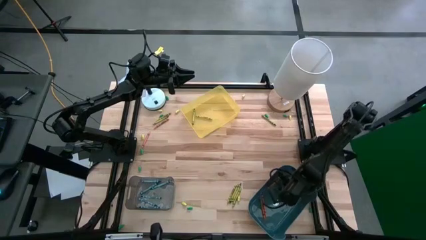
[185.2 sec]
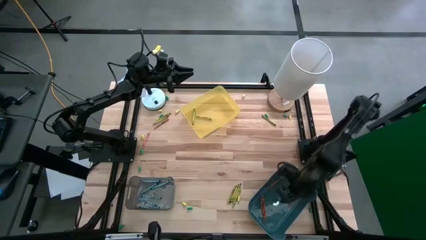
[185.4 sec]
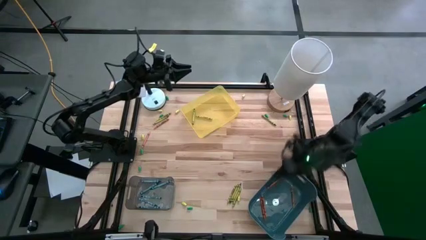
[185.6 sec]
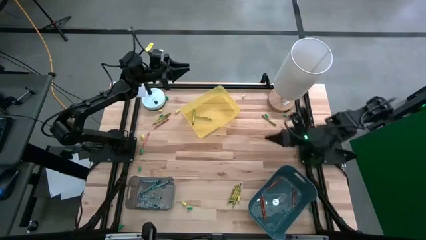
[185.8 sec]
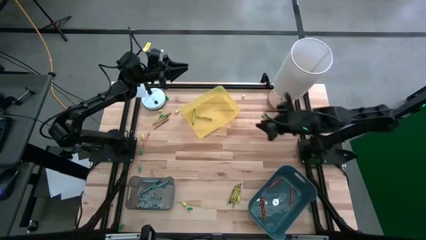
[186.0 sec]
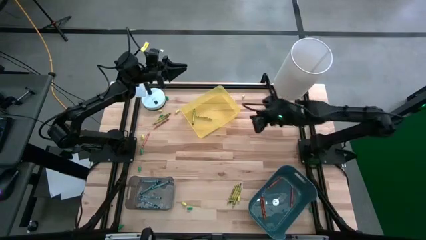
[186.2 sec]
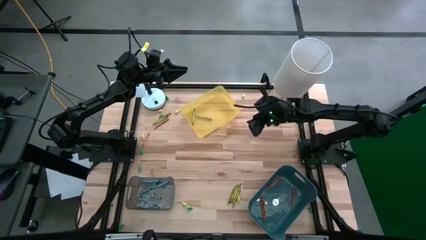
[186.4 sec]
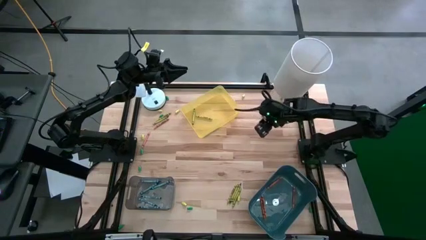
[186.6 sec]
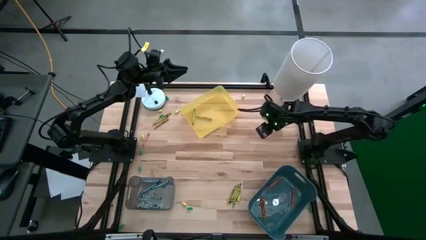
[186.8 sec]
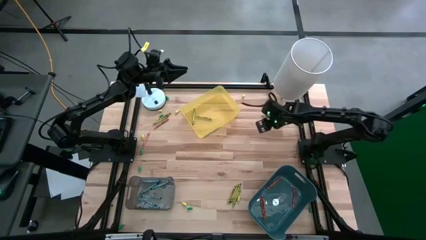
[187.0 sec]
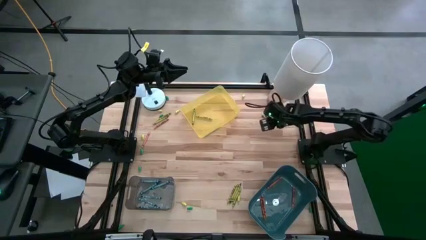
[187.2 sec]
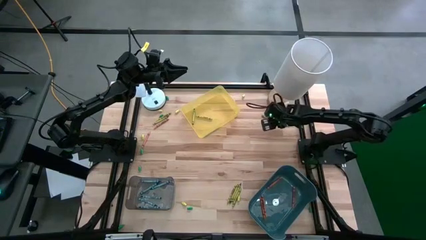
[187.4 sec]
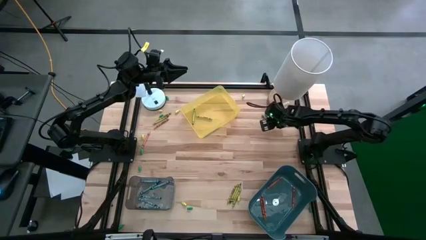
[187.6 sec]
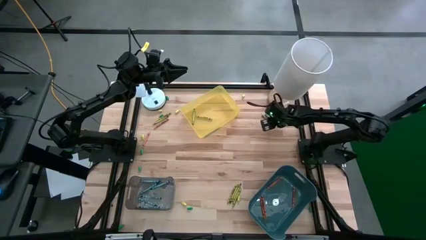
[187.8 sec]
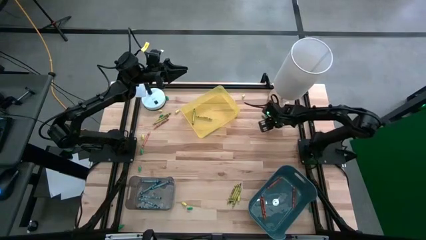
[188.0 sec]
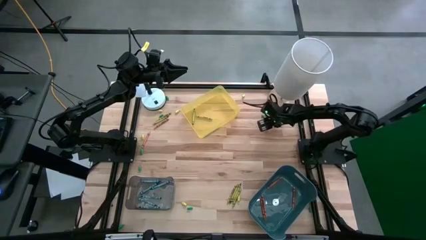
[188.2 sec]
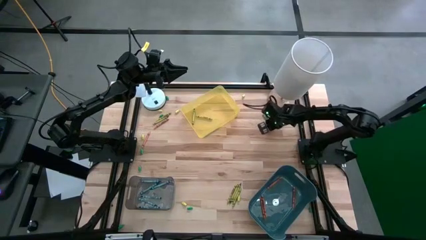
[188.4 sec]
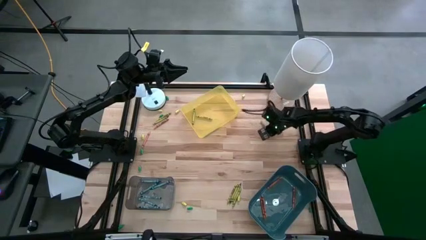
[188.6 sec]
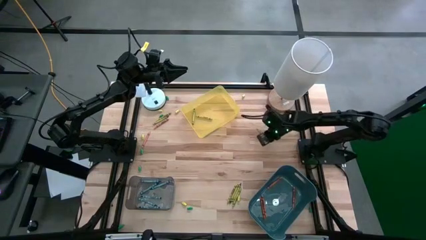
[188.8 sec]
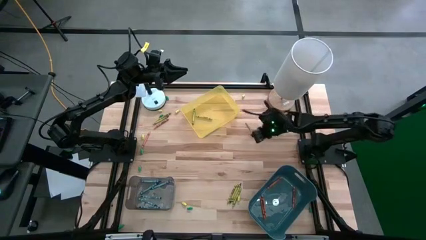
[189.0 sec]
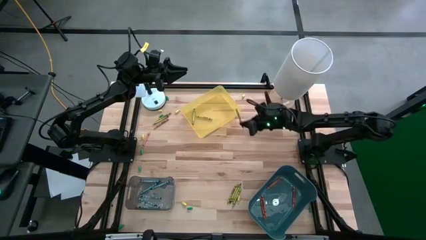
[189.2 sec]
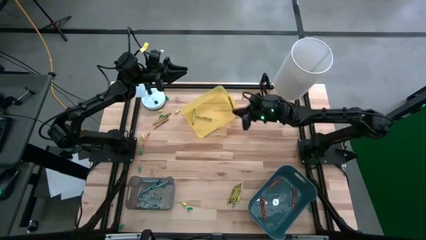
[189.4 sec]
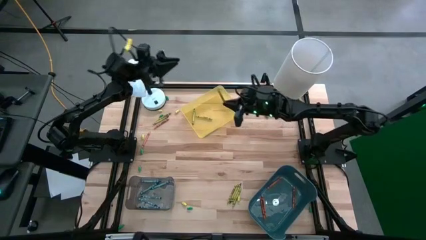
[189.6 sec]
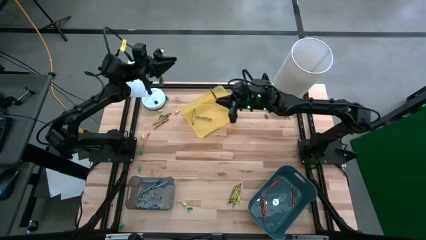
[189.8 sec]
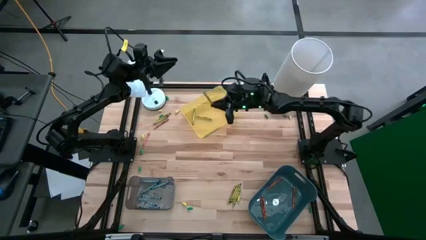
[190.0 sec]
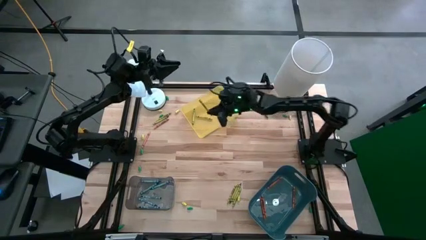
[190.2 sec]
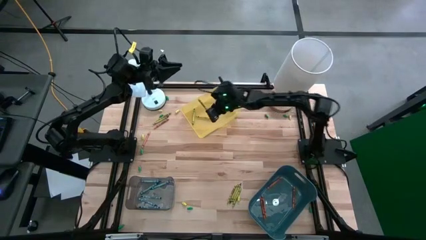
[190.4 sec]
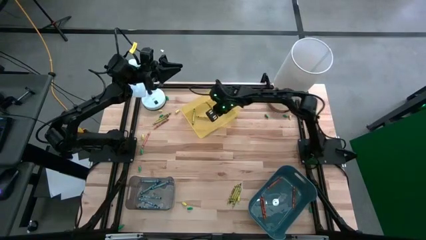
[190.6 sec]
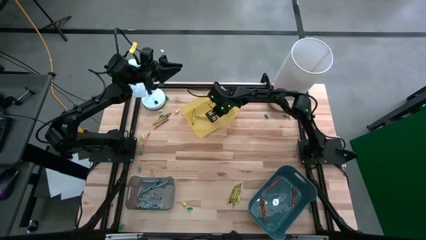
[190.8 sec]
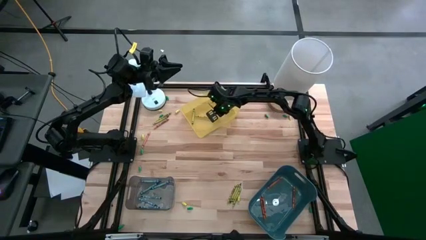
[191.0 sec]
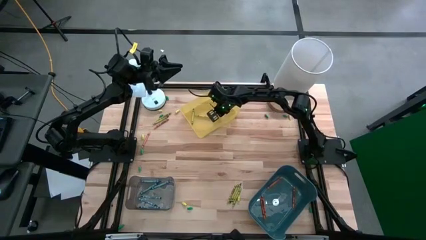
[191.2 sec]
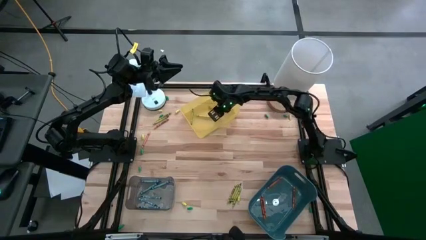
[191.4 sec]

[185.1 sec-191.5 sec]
Task: Sort crayons
Put the green crayon into the yellow bin

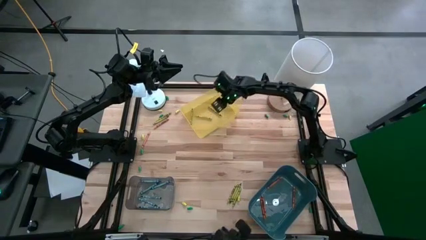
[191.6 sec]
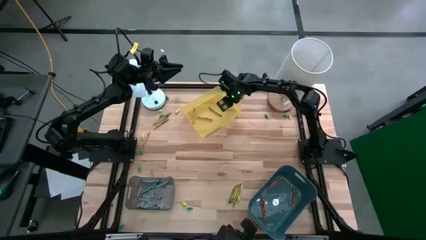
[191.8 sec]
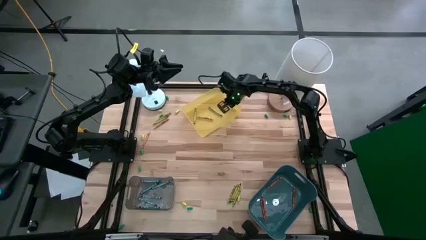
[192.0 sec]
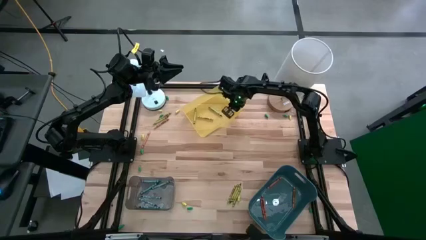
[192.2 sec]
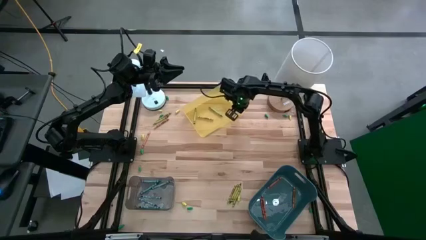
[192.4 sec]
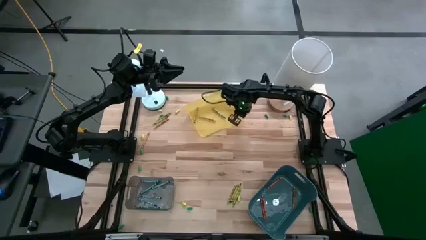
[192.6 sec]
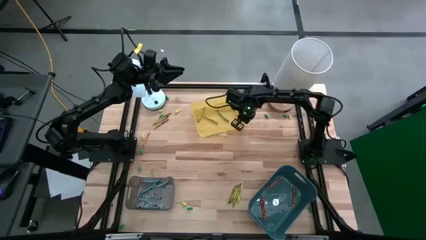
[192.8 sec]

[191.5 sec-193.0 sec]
Adjust the yellow bin

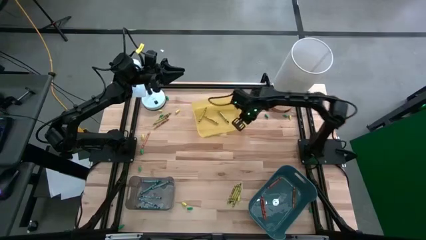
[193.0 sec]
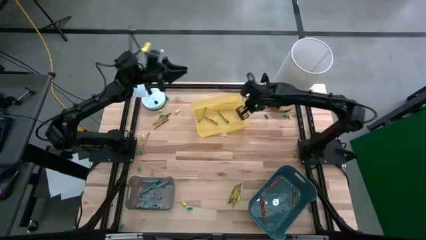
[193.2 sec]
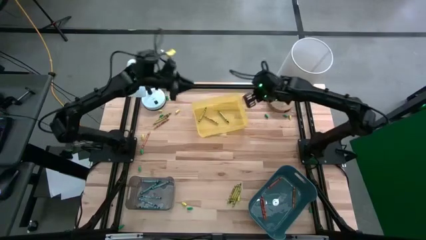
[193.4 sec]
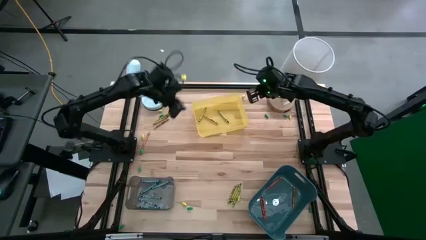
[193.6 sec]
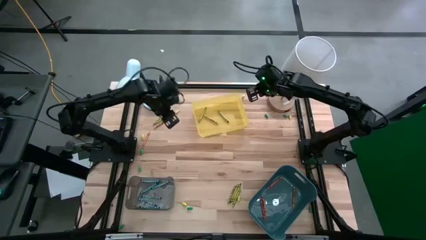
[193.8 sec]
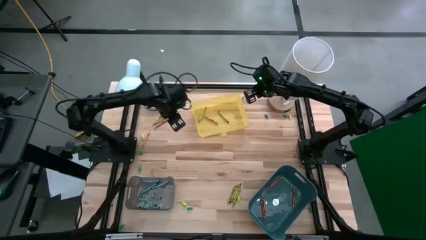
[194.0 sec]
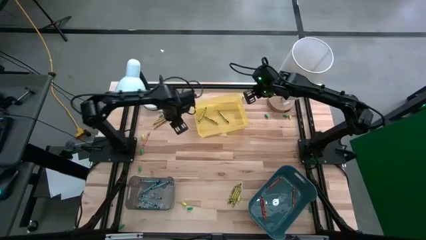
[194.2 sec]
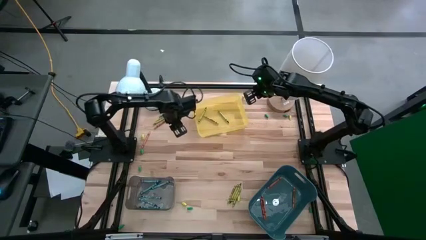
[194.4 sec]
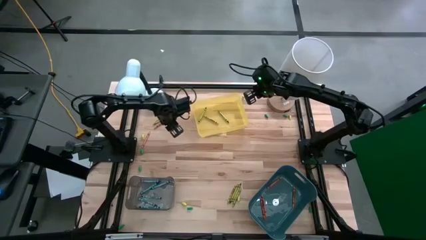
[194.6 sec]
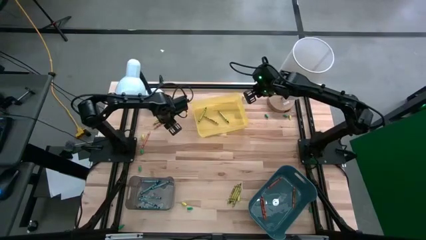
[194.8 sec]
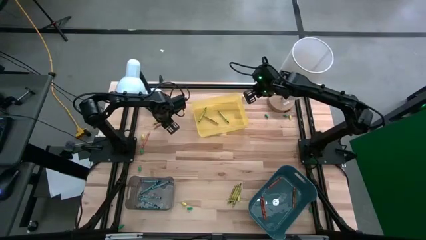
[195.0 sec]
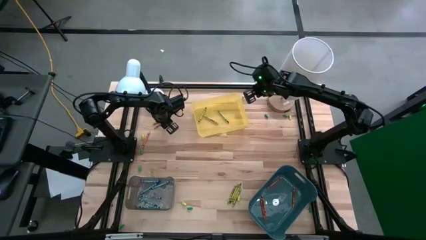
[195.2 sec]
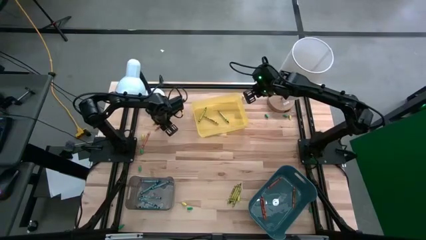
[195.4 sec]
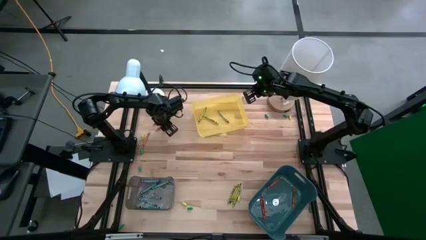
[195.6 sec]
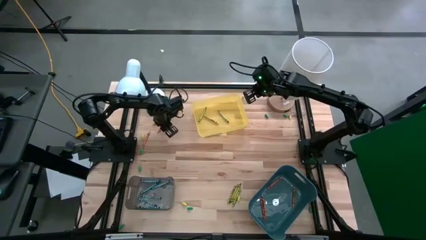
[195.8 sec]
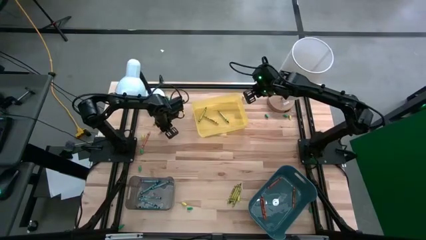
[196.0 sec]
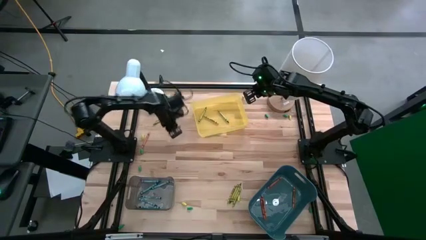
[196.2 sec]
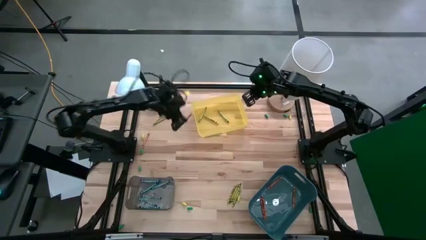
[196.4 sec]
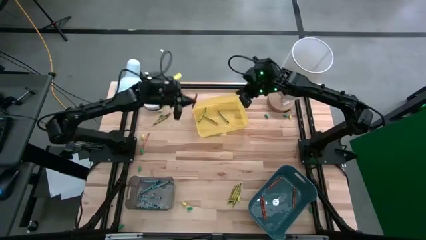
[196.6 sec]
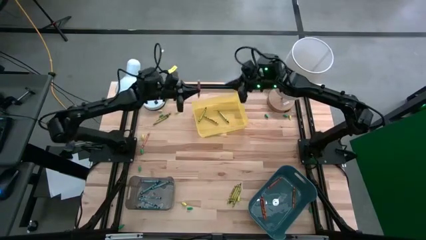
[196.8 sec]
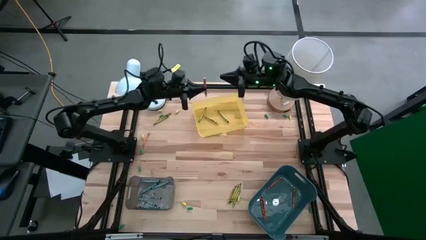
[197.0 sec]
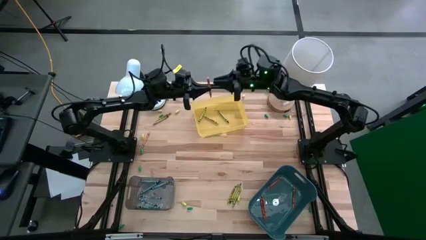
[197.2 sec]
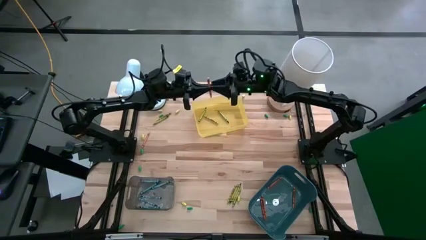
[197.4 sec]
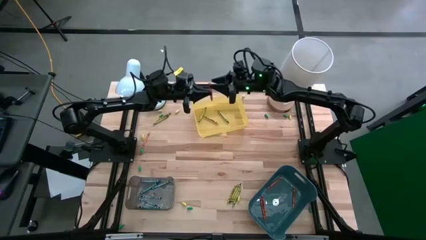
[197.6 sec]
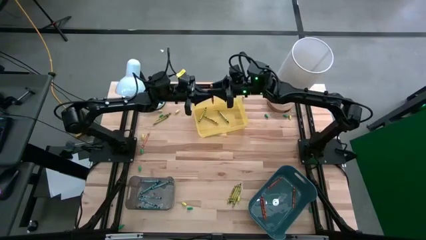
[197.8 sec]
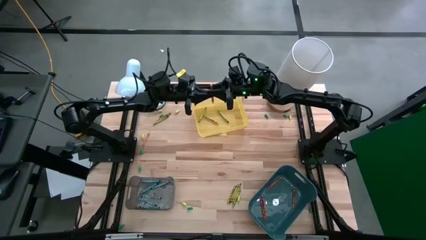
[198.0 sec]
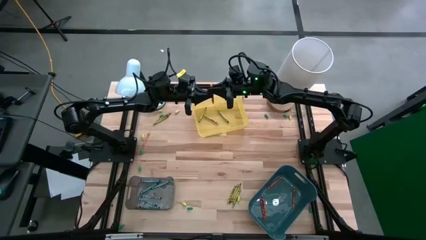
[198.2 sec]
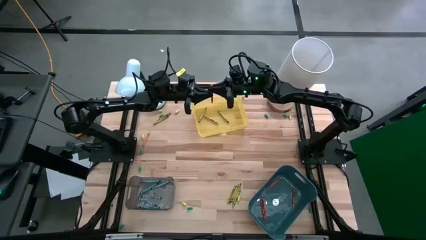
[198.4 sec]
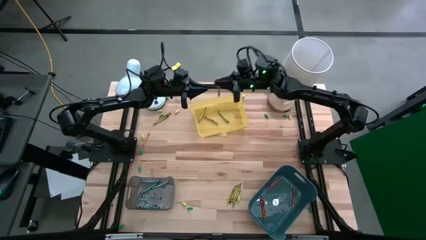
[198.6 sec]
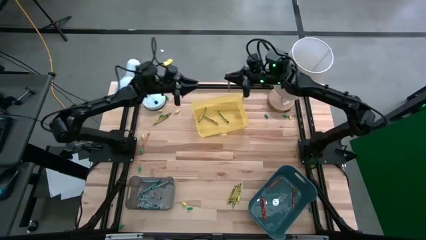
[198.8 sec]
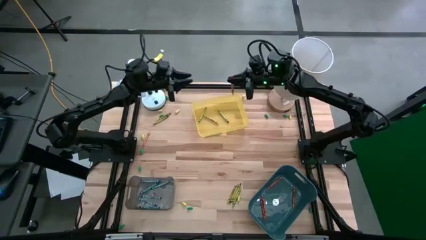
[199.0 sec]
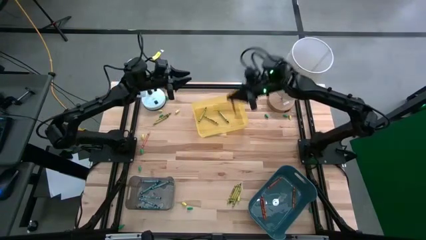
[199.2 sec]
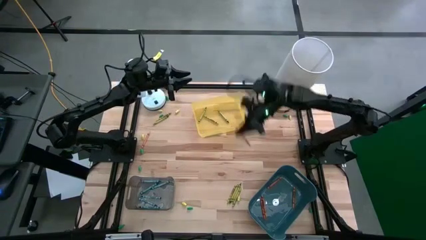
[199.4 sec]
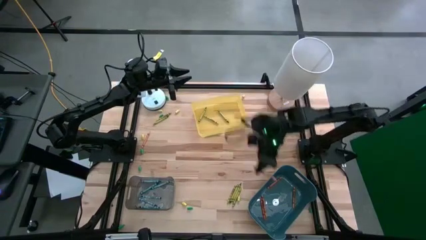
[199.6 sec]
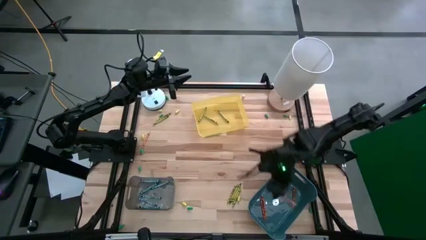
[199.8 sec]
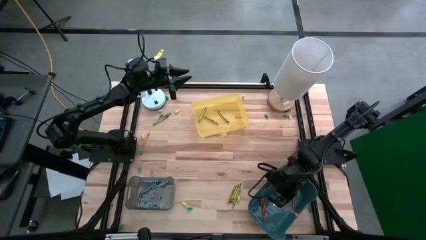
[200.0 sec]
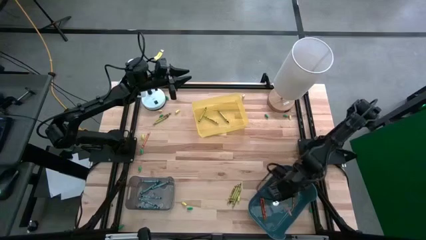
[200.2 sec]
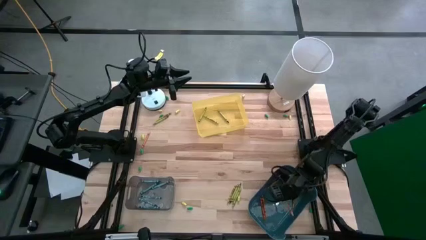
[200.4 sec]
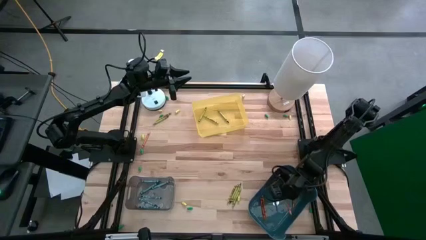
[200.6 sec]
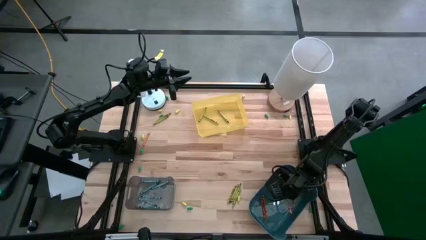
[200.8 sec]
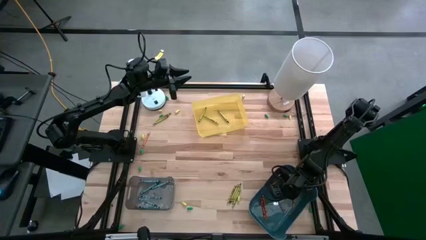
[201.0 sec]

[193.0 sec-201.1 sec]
Put the orange crayon into the green bin
